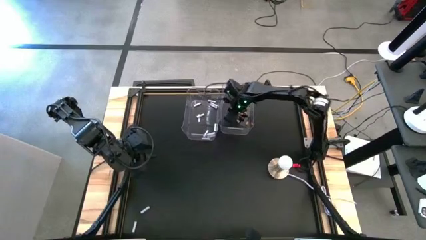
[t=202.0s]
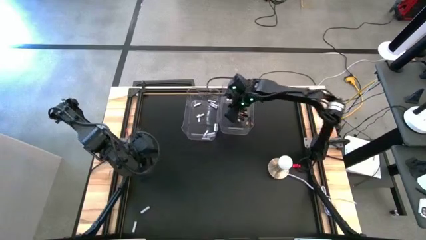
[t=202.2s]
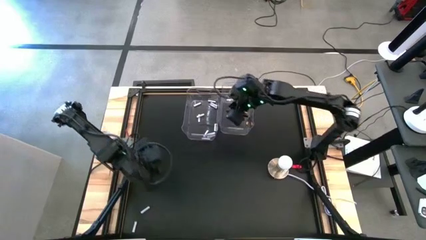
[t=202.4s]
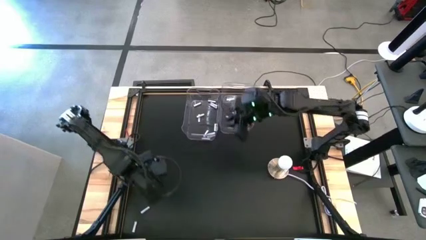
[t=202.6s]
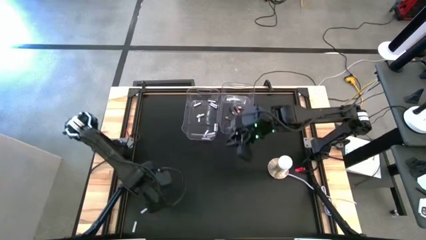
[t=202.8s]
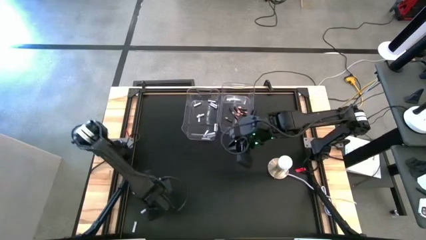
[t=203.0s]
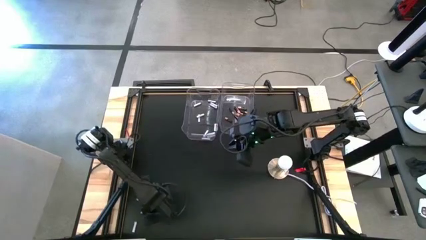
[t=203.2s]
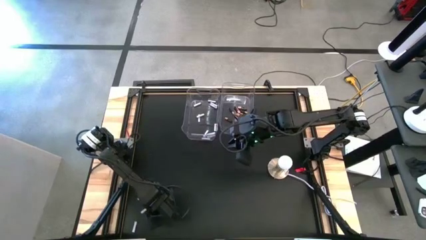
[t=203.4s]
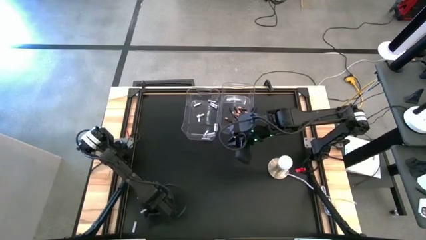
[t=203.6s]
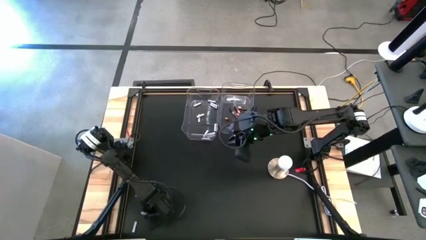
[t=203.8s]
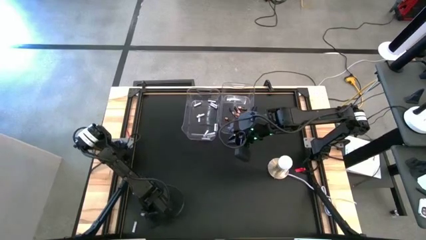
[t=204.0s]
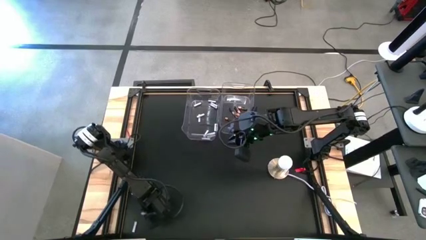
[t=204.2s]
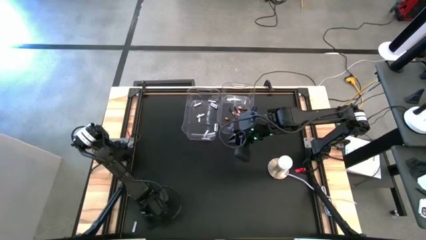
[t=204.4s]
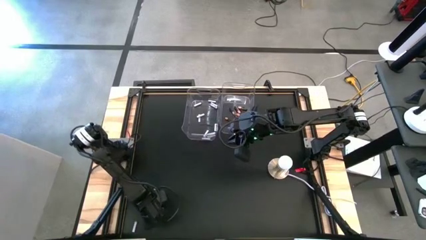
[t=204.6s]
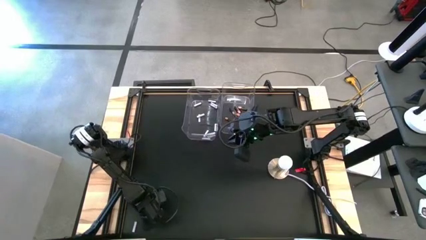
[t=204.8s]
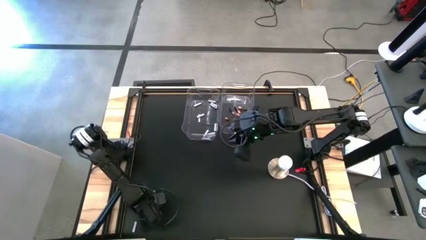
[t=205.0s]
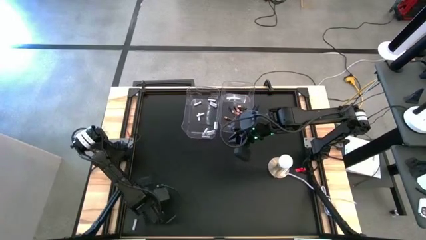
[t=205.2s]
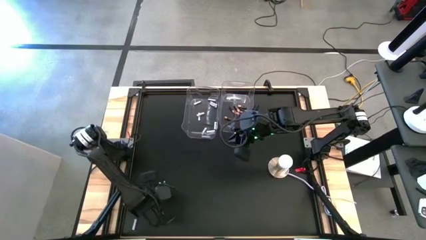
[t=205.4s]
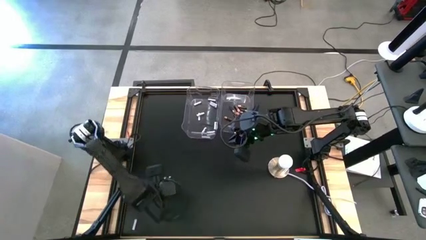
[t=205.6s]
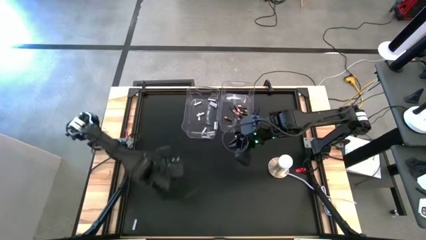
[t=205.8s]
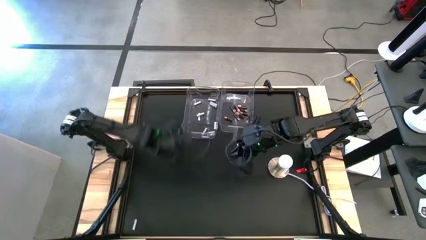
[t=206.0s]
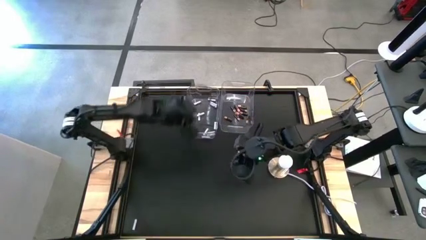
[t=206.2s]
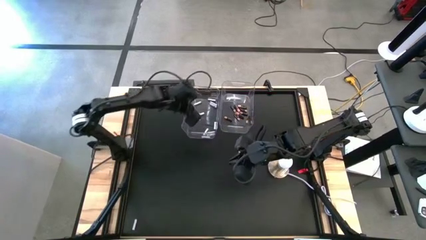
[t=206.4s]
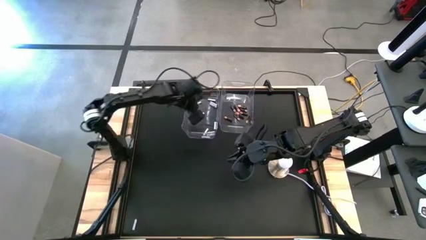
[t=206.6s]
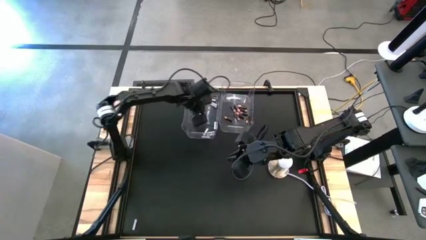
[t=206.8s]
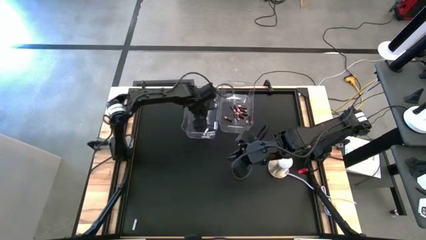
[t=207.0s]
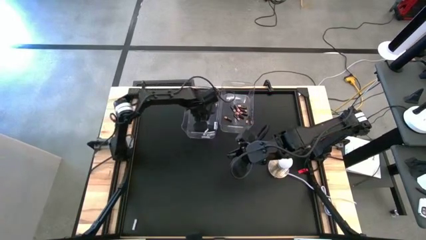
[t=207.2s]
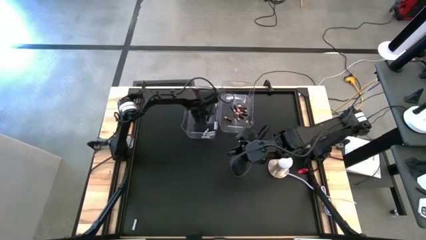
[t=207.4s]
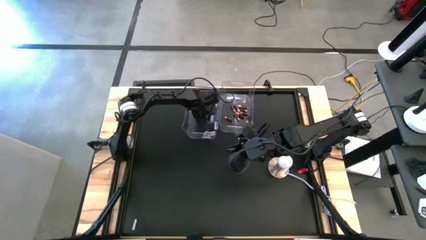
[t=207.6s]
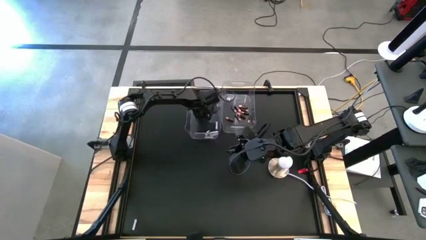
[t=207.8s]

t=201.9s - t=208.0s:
Task: Sort batteries
Put the white battery into the left transparent bin

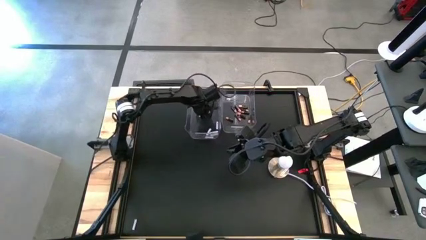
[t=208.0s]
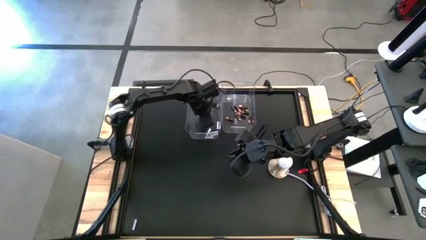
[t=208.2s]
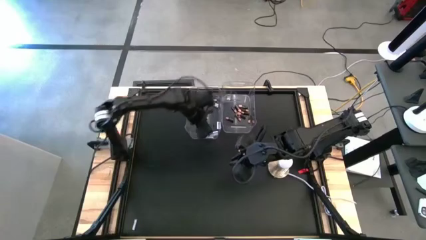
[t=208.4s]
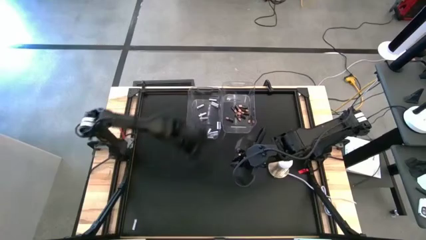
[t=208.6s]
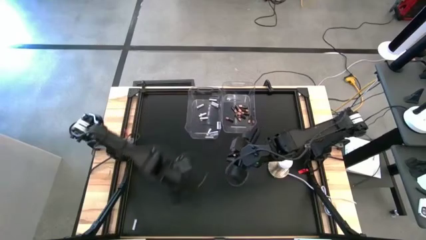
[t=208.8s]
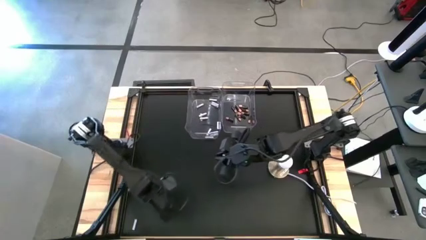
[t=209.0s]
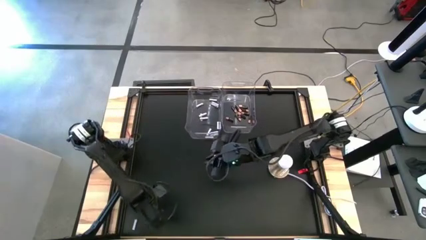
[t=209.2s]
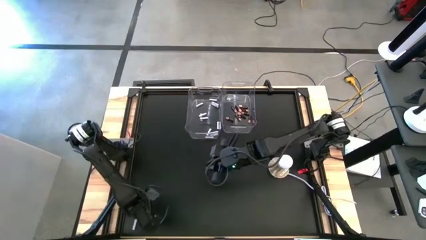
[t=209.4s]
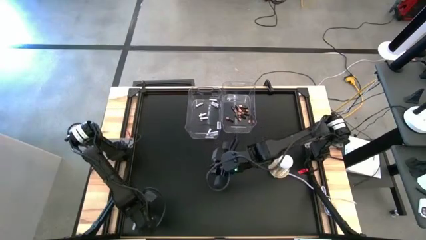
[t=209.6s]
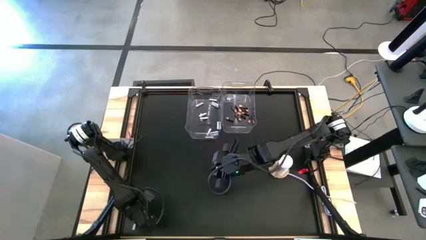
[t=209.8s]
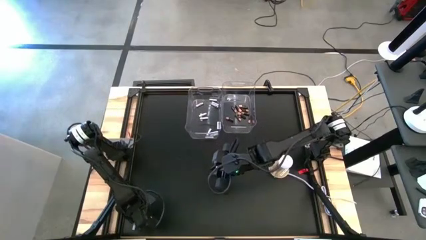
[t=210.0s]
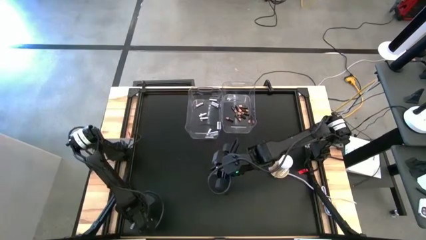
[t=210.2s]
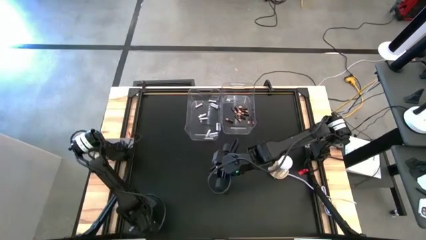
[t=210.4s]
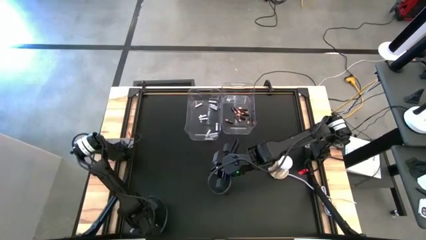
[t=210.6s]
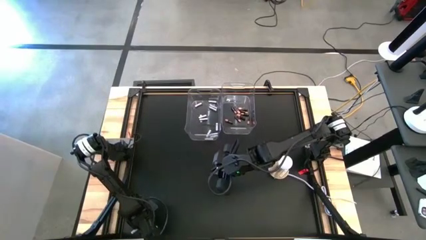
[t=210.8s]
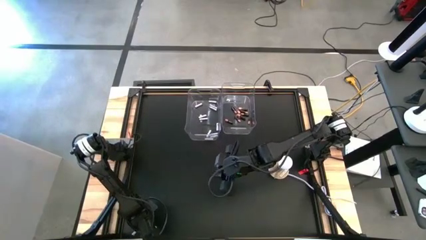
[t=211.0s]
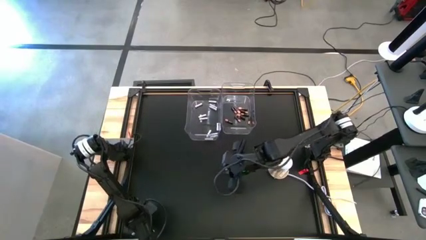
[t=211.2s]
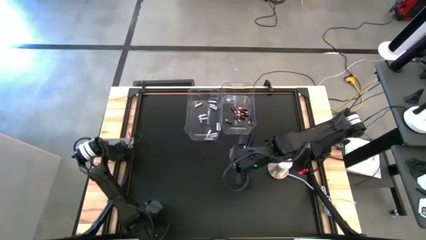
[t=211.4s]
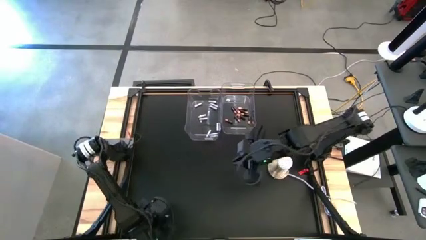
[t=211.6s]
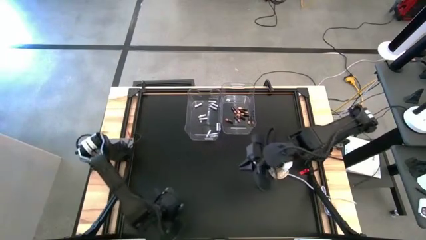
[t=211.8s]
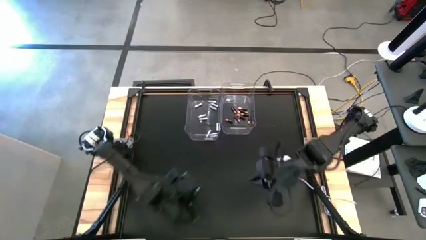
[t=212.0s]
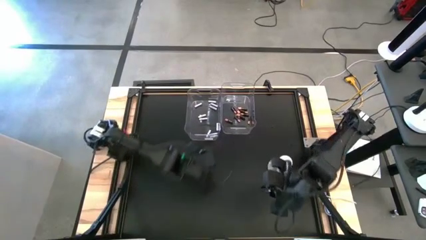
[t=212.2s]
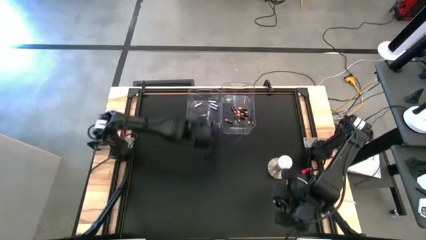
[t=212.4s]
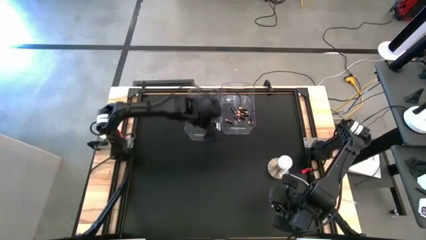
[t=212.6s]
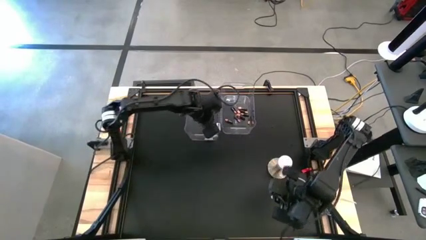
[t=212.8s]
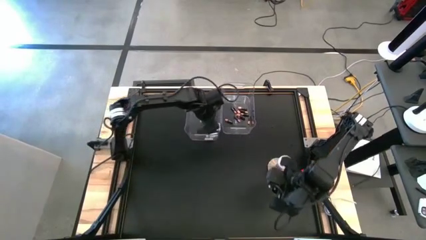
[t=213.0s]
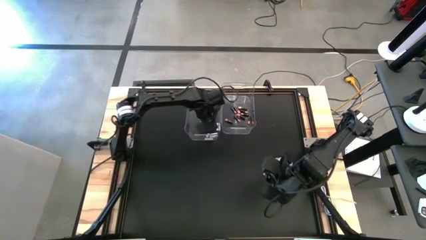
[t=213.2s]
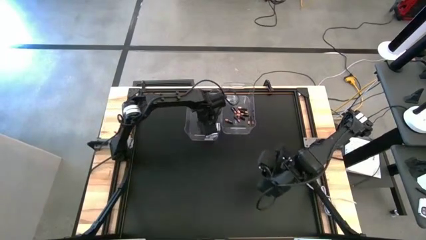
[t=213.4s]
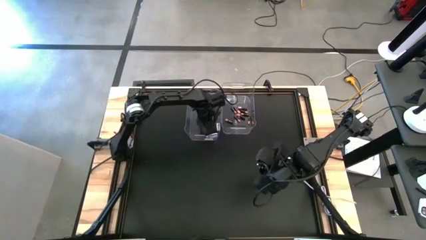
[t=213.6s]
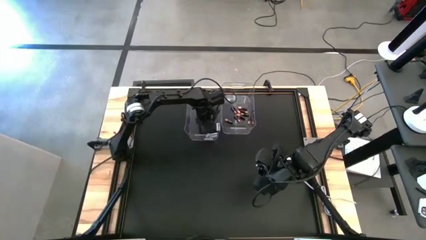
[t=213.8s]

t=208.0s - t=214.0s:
Put the white battery into the left transparent bin

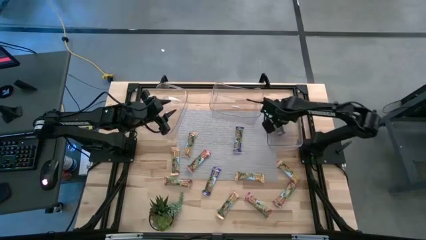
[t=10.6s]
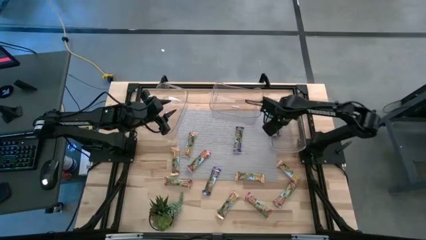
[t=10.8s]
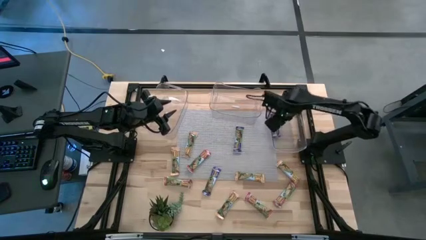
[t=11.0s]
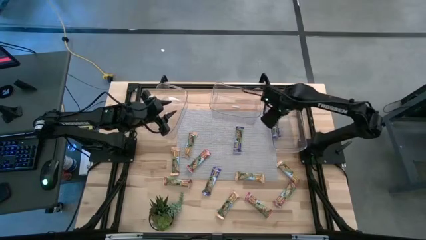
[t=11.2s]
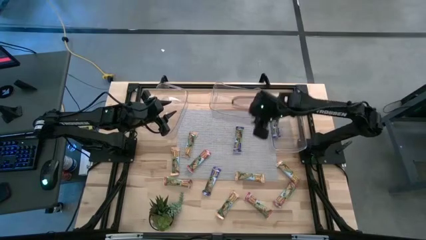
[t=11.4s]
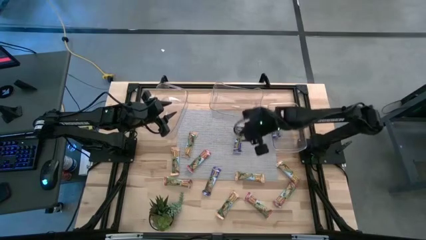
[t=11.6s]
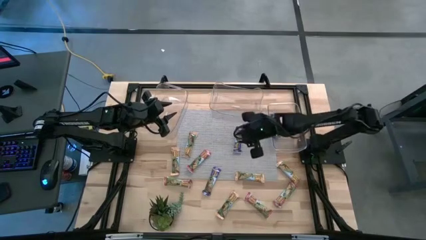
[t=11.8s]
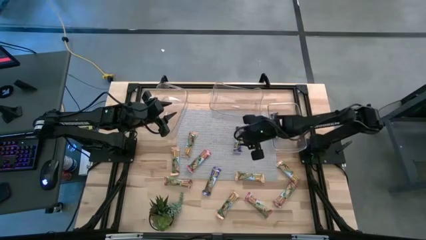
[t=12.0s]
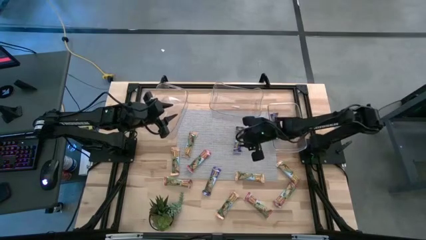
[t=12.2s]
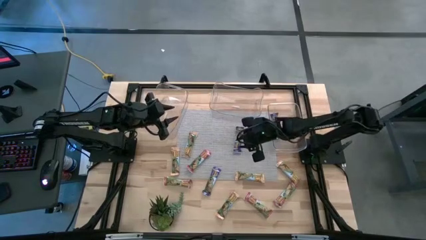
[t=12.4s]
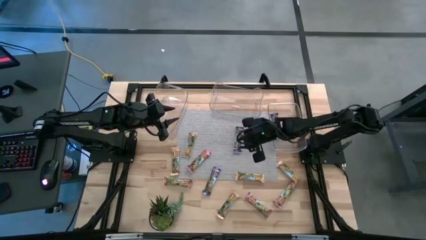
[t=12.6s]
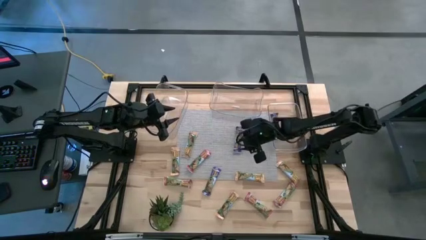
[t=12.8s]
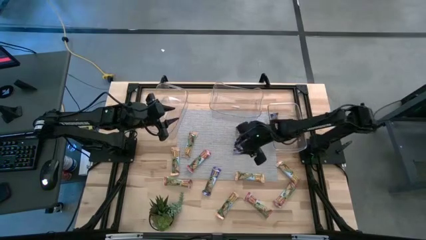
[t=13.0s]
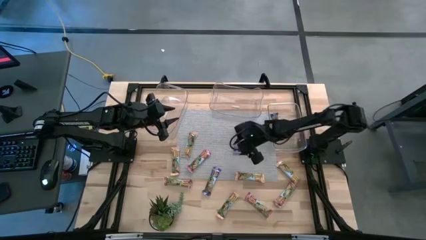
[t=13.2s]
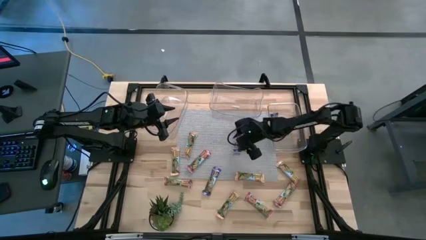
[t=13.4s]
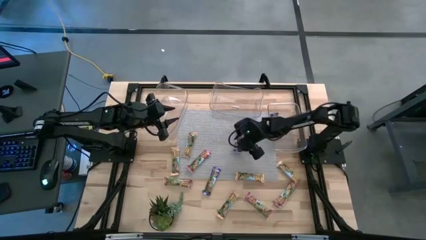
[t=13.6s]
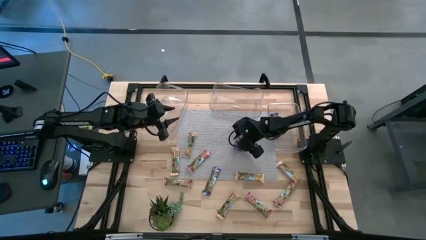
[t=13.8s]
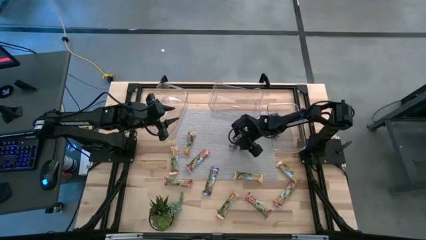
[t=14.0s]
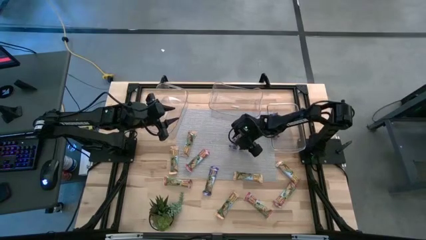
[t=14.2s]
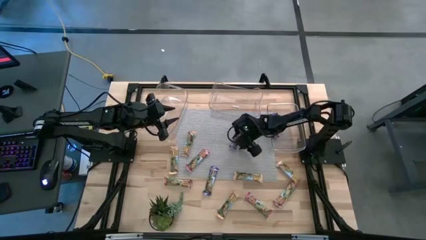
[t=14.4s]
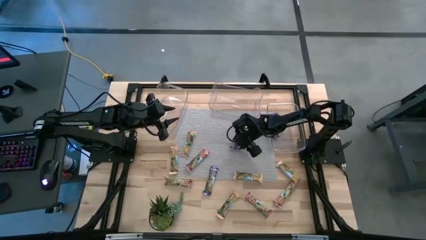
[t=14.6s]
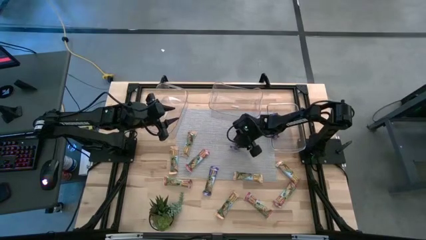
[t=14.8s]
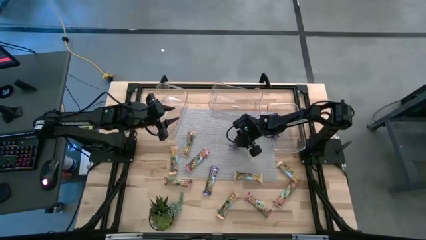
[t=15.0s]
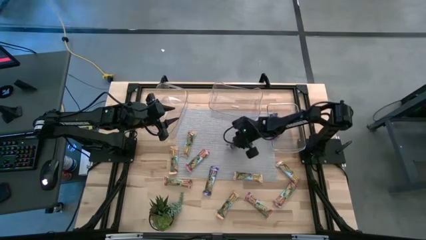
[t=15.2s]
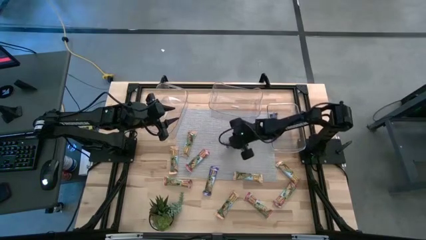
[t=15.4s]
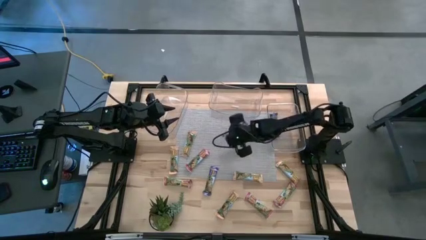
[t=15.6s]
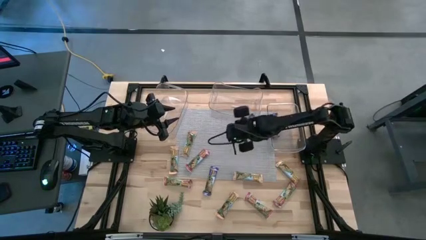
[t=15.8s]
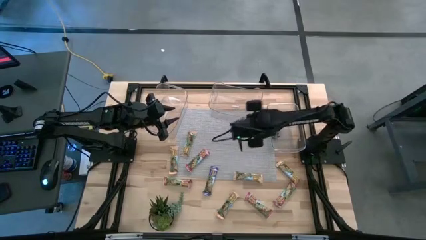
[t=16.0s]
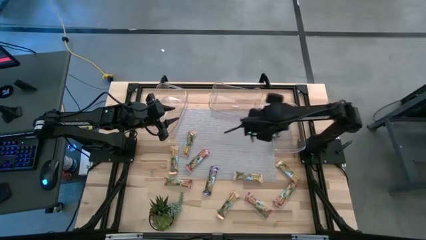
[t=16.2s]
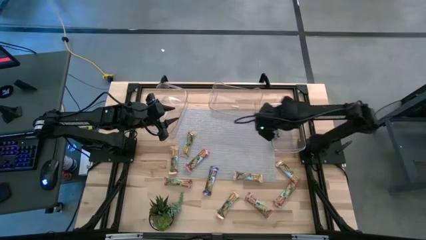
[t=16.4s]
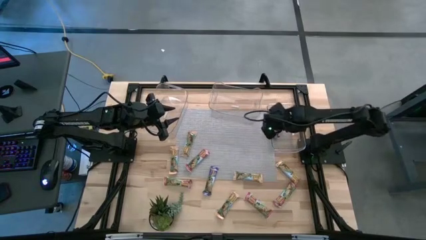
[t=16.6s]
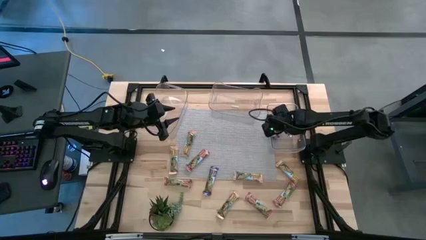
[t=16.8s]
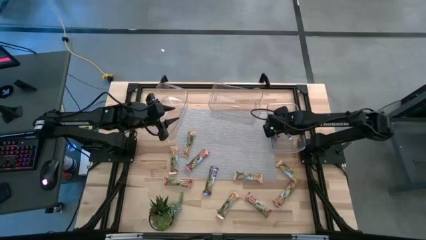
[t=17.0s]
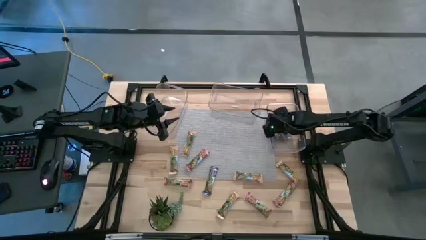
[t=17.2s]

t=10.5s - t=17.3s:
Task: Pick and place Granola Bars by type
Put the blue granola bar into the right transparent bin
